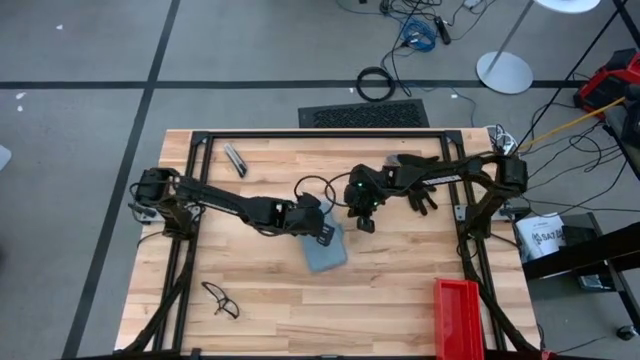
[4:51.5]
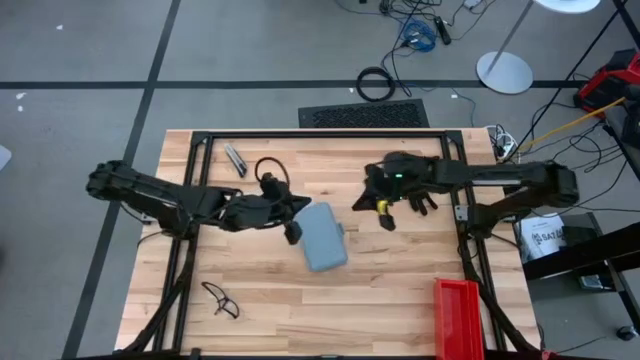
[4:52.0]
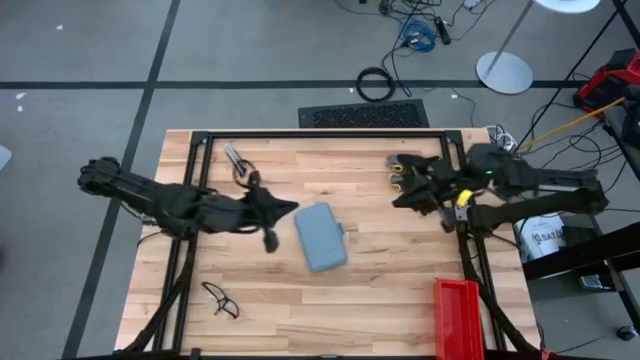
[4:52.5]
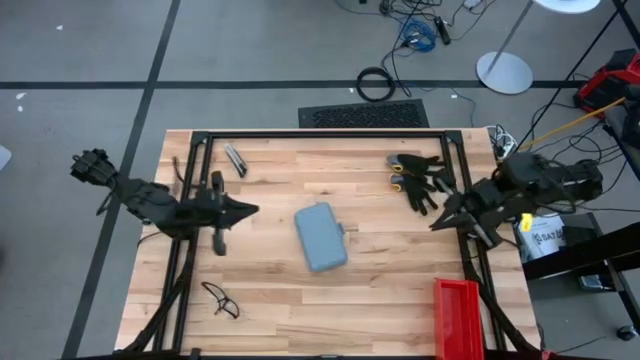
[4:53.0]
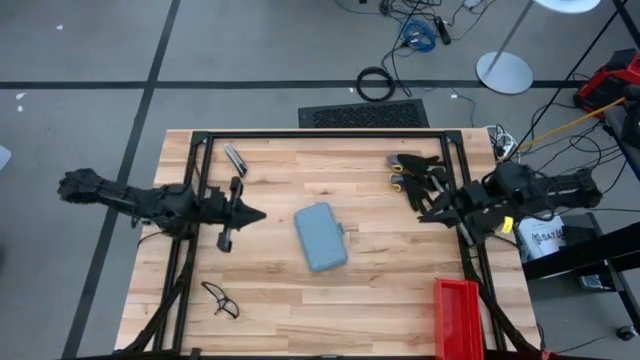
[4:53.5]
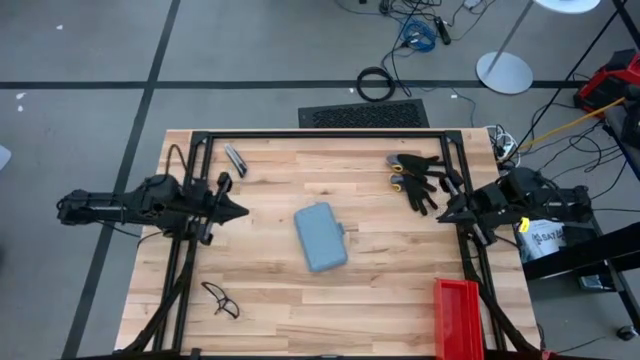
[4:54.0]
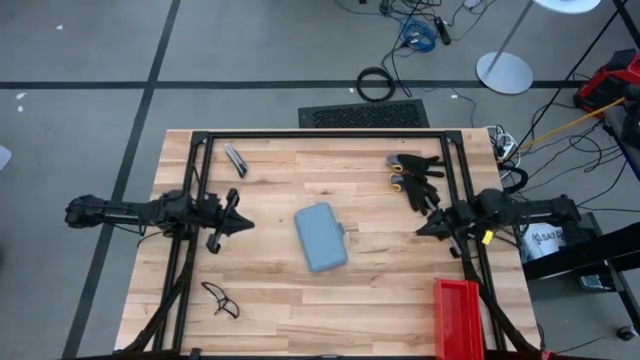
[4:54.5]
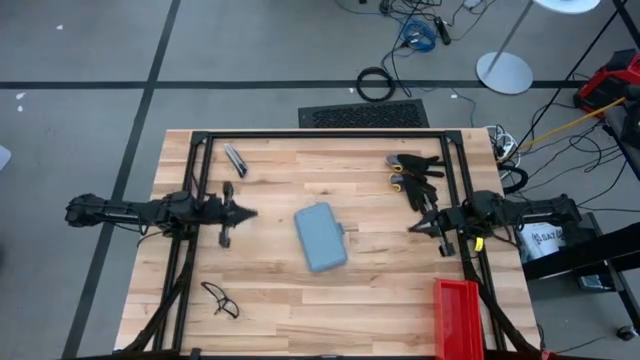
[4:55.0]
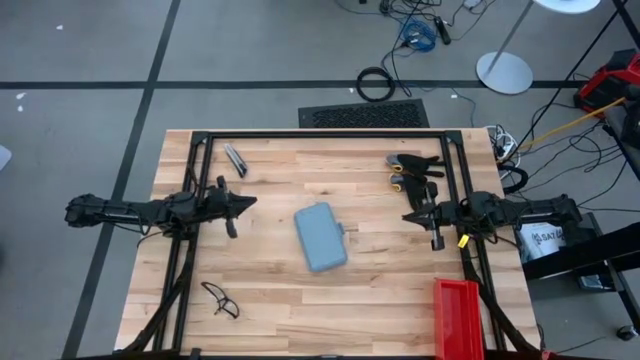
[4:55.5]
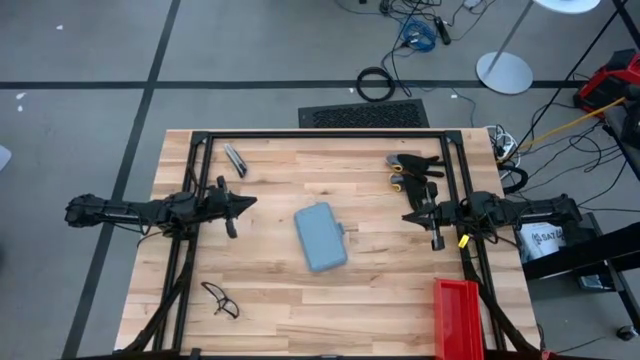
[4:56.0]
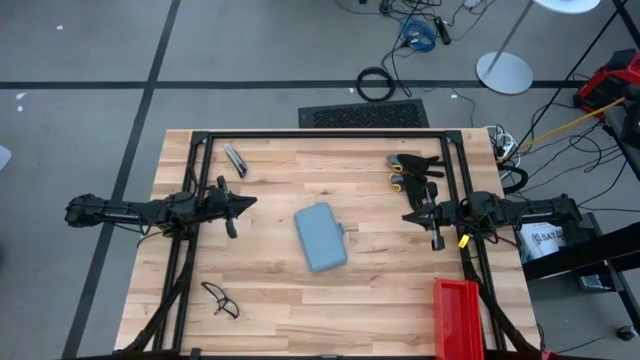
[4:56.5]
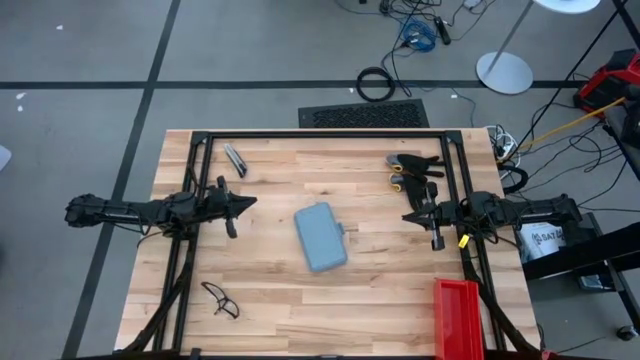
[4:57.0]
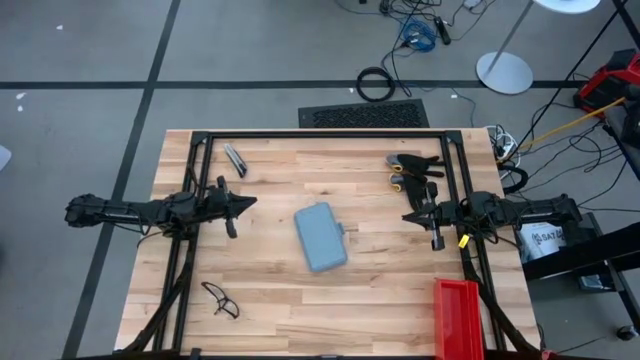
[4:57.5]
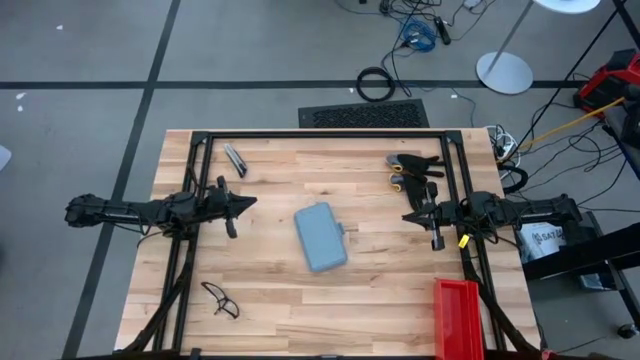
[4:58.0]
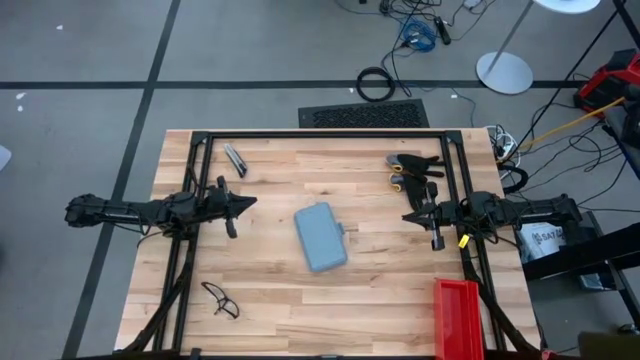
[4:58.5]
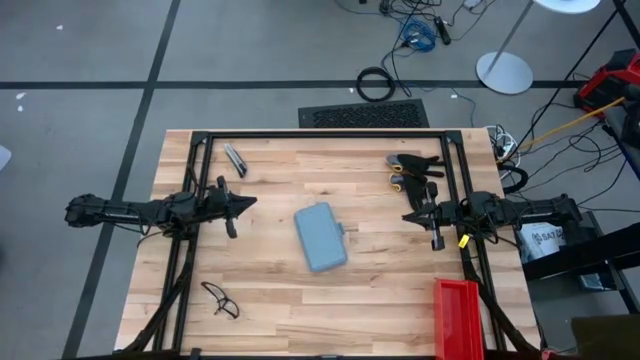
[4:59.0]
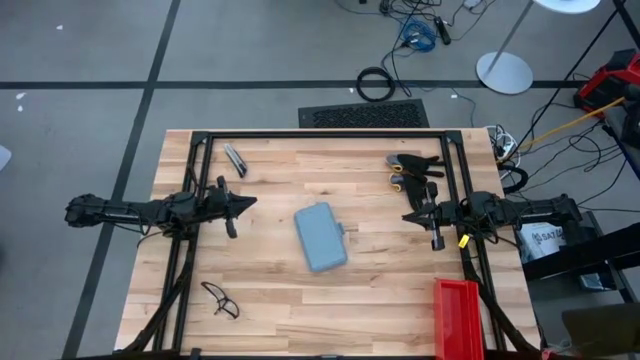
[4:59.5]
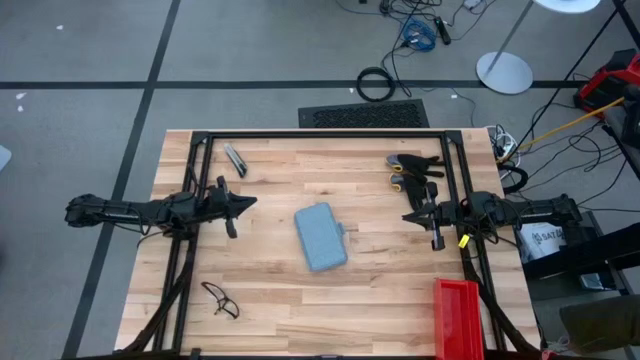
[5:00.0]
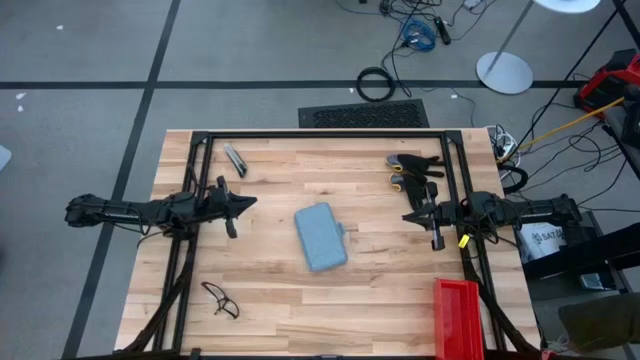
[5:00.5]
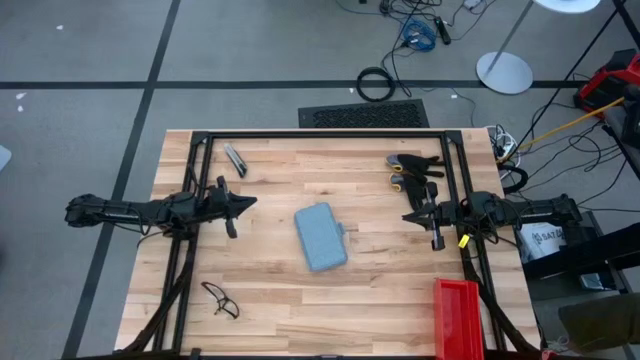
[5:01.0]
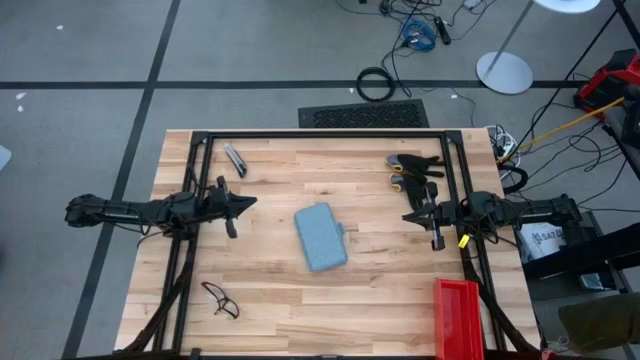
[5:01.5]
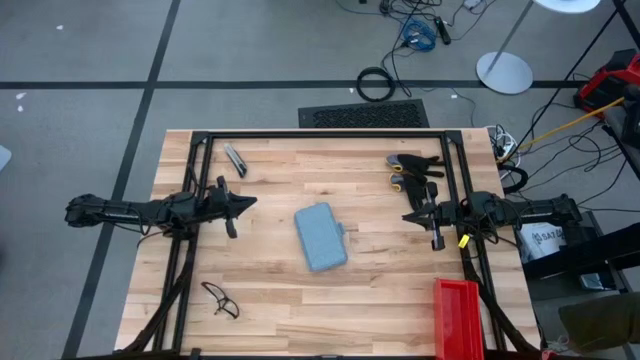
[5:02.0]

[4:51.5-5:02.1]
Task: prefit tool cases
Return to Home Position

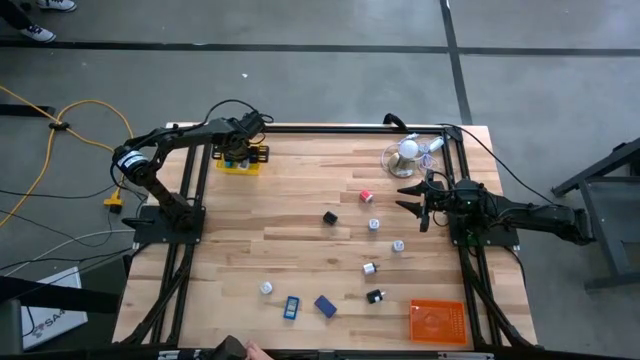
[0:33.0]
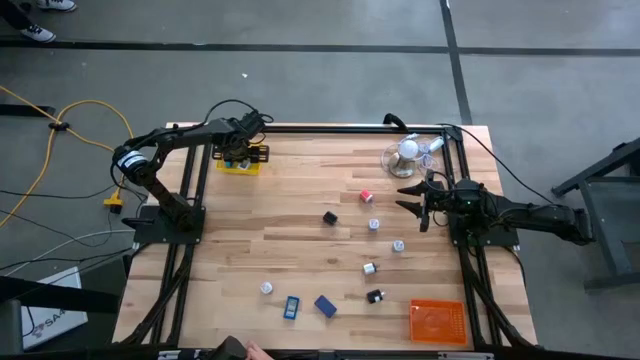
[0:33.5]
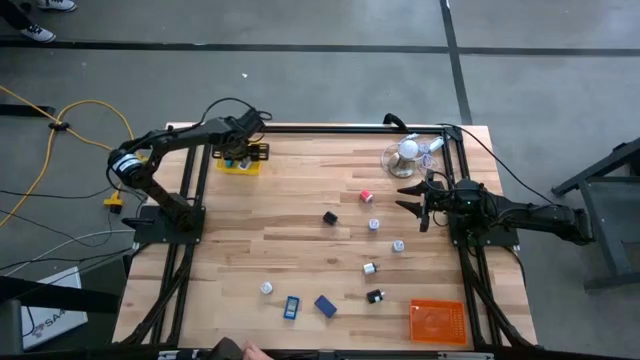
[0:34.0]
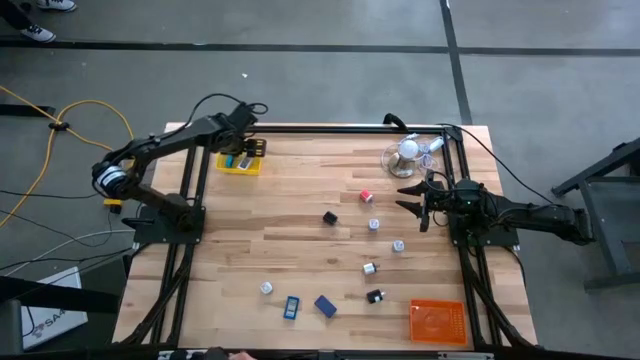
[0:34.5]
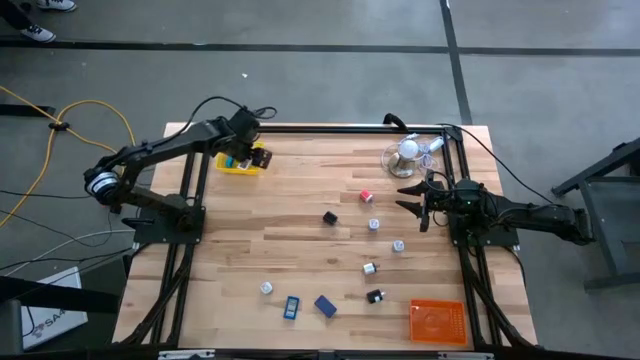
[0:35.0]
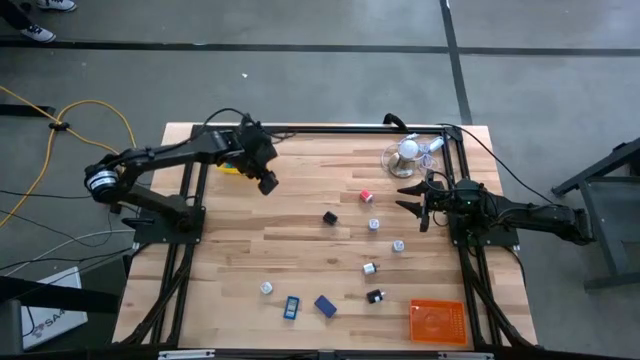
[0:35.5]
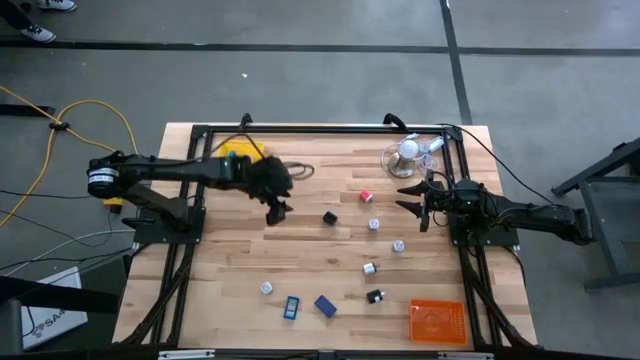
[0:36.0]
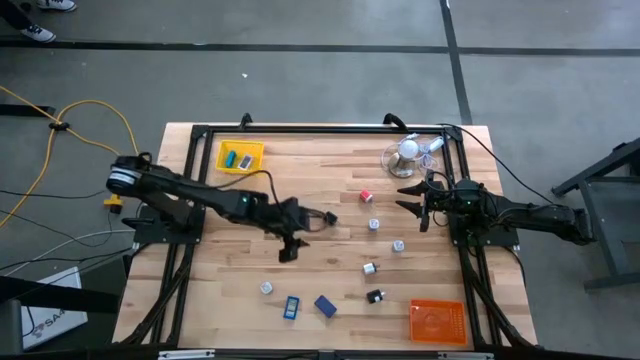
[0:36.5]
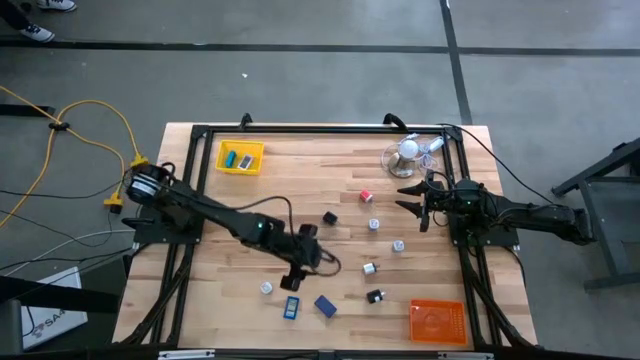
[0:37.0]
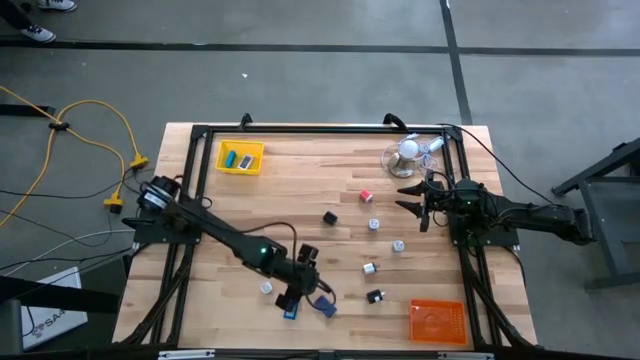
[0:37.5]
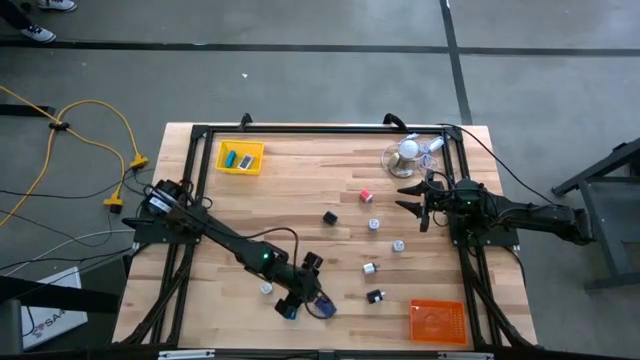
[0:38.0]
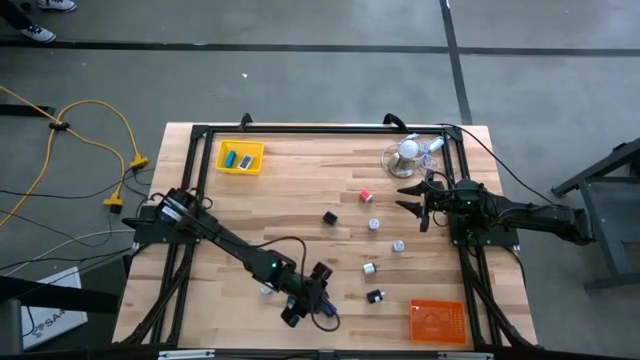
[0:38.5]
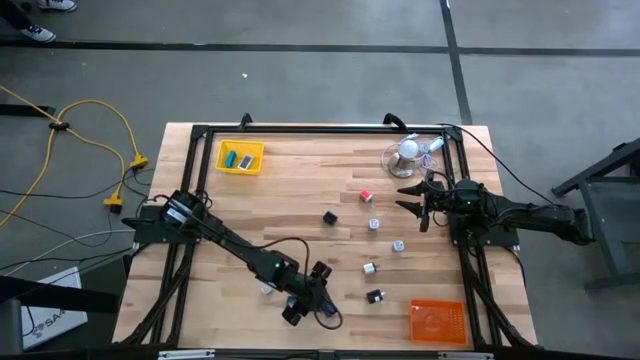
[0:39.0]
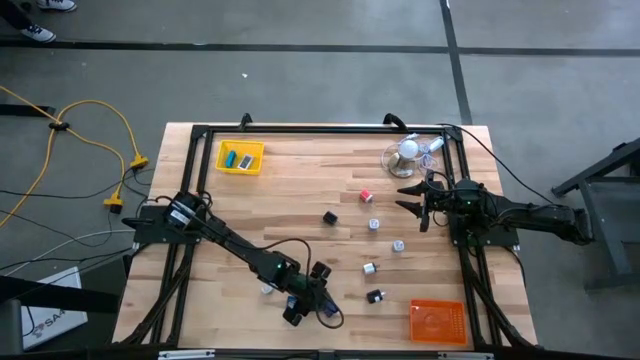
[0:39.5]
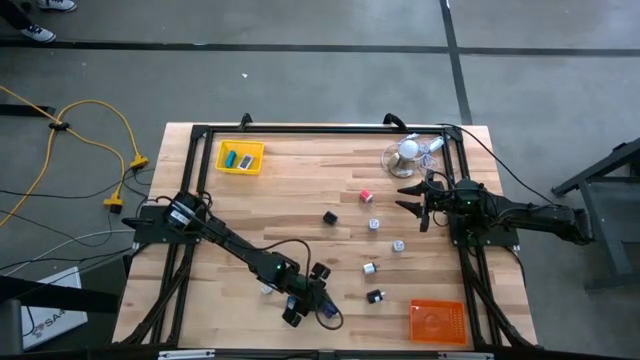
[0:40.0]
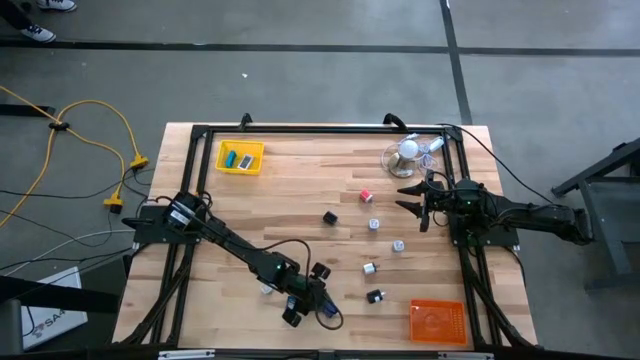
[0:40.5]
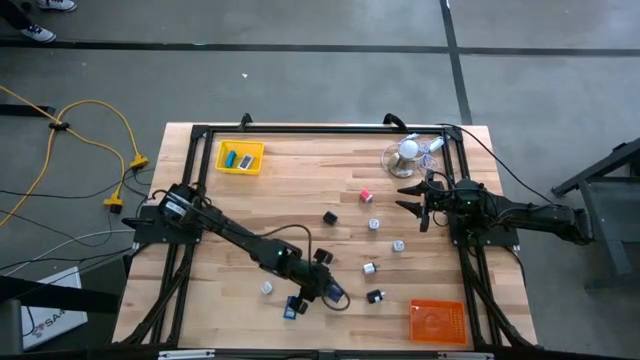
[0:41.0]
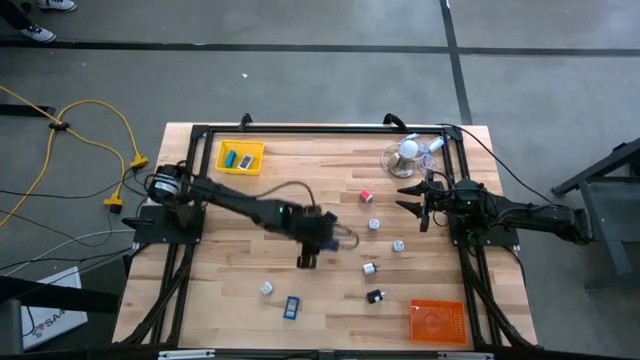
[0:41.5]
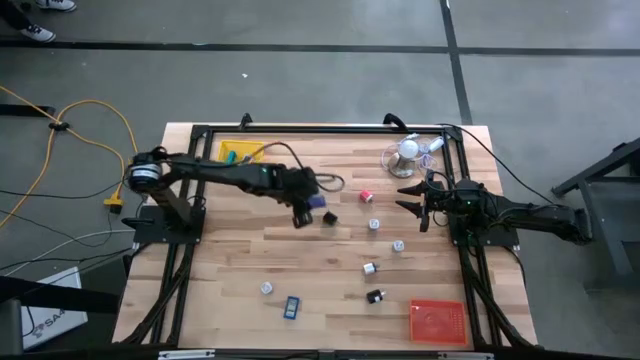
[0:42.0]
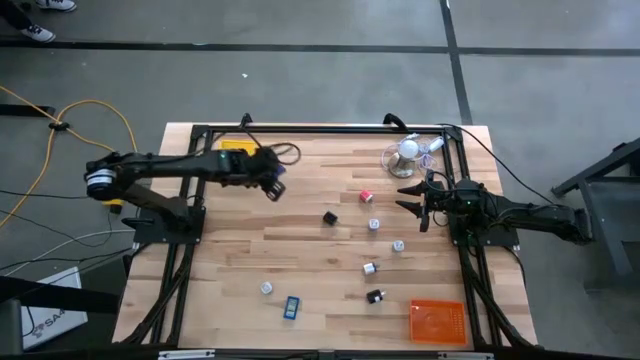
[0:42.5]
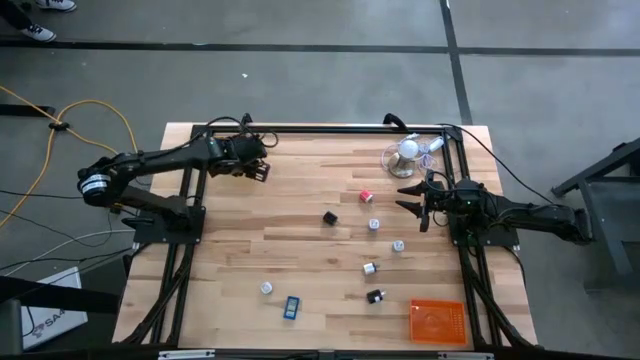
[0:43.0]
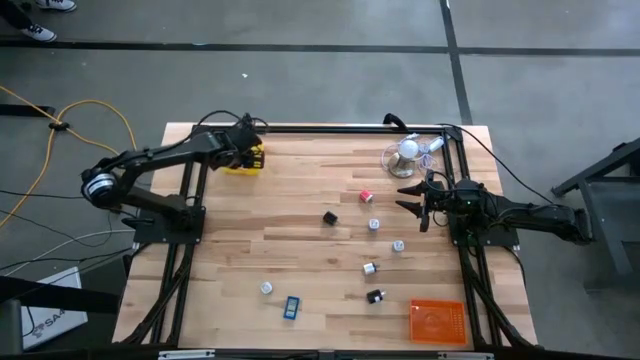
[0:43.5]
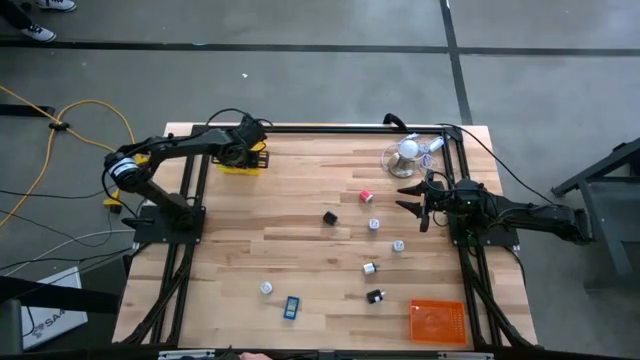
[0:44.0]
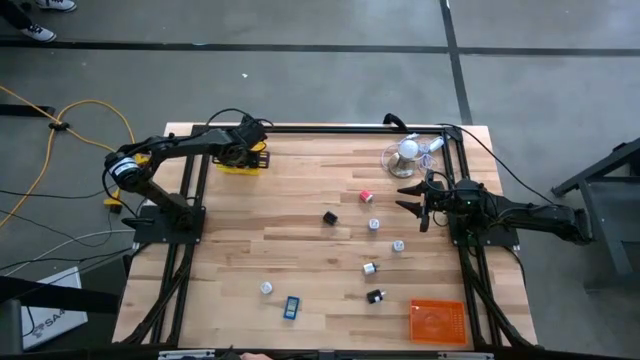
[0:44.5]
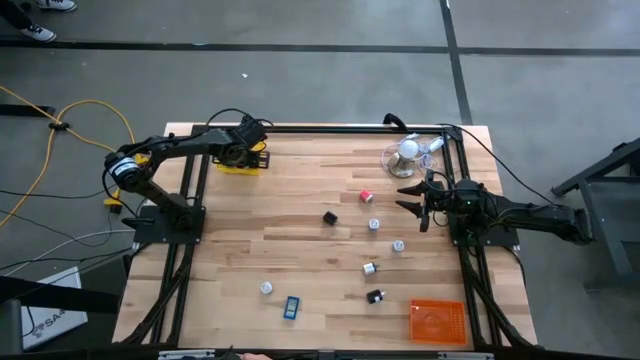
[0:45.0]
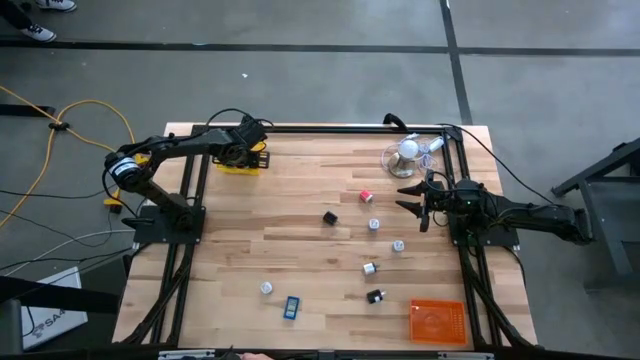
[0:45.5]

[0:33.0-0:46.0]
Task: Pick & Place Office items
Put the dark blue digital timer into the yellow bin
